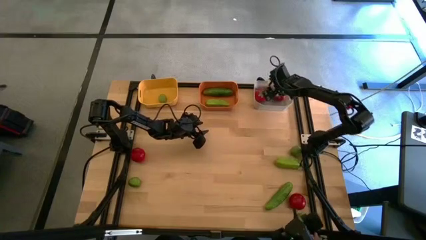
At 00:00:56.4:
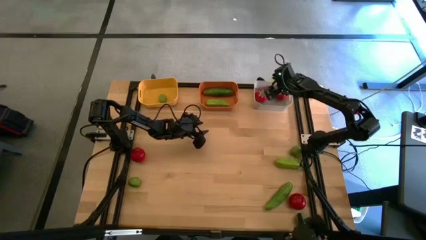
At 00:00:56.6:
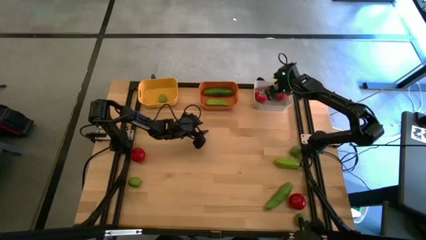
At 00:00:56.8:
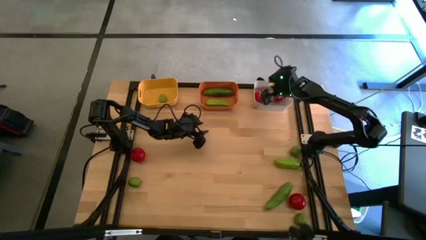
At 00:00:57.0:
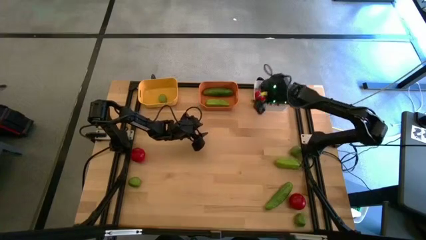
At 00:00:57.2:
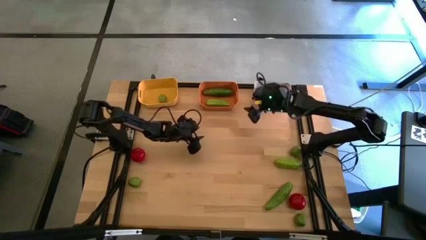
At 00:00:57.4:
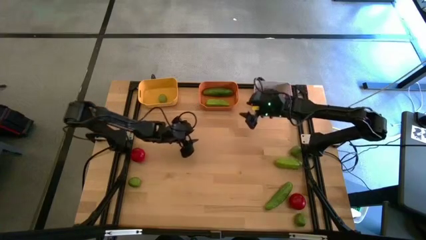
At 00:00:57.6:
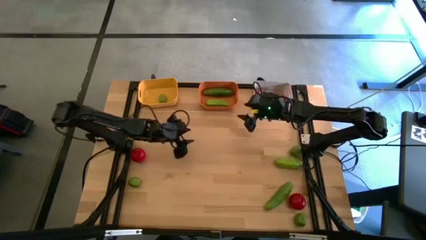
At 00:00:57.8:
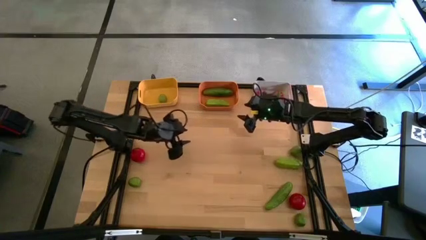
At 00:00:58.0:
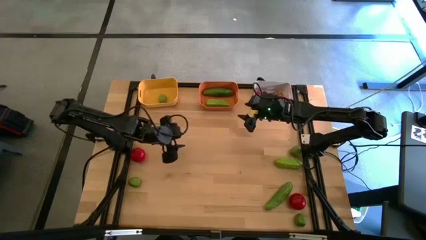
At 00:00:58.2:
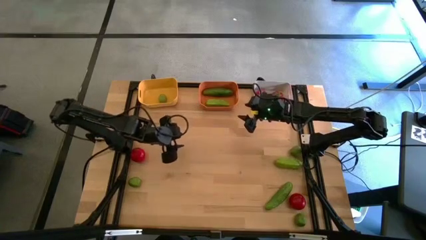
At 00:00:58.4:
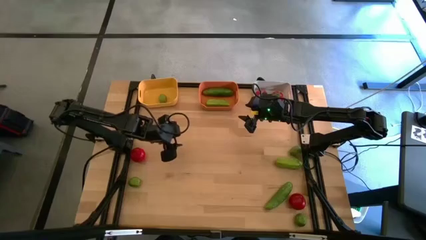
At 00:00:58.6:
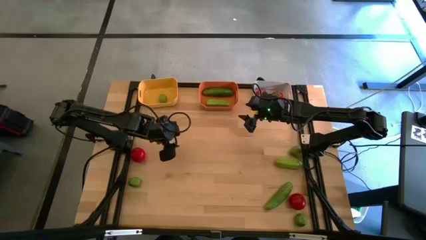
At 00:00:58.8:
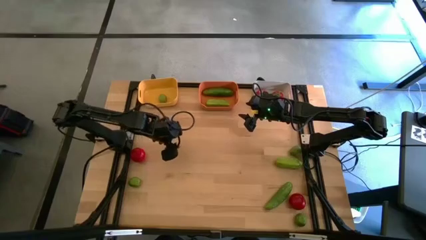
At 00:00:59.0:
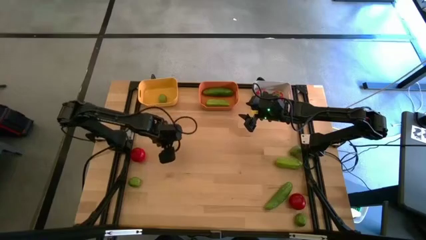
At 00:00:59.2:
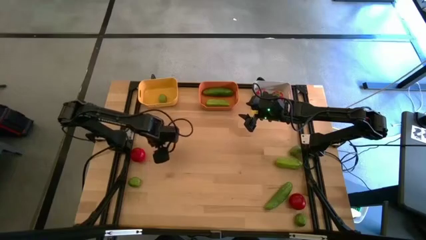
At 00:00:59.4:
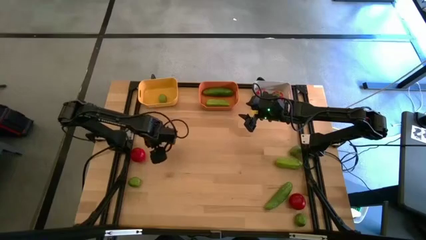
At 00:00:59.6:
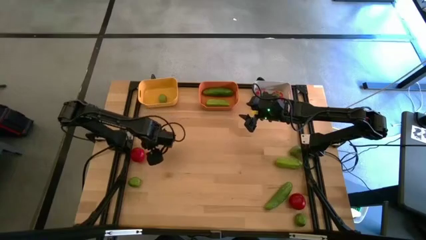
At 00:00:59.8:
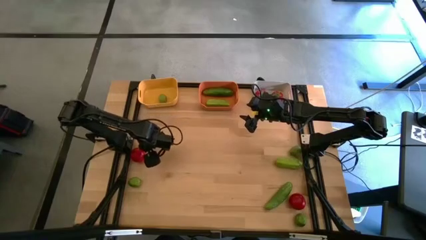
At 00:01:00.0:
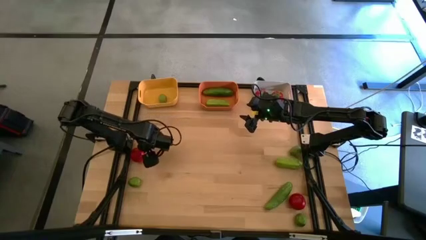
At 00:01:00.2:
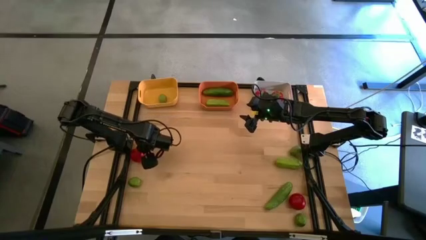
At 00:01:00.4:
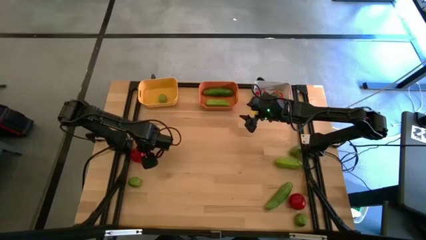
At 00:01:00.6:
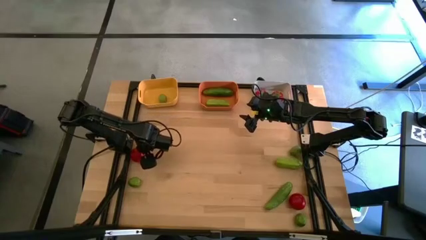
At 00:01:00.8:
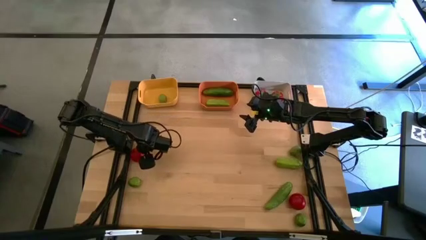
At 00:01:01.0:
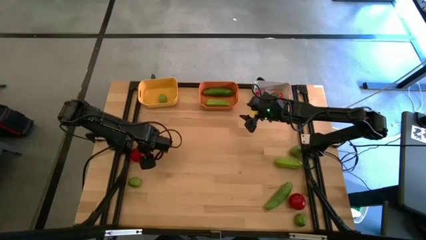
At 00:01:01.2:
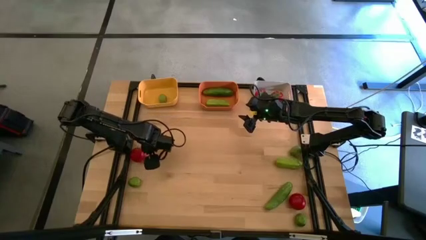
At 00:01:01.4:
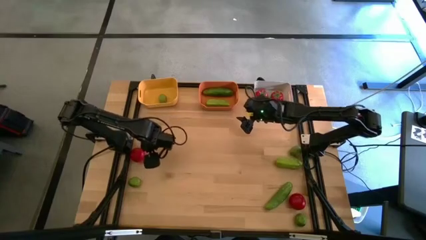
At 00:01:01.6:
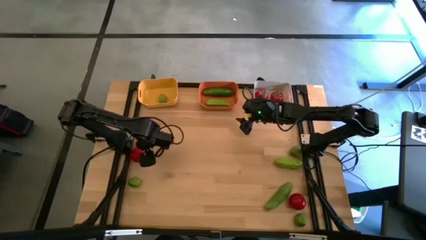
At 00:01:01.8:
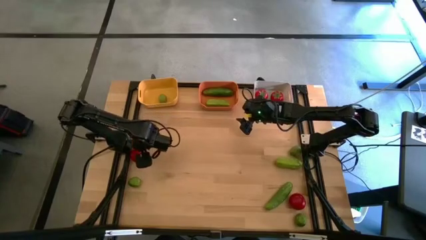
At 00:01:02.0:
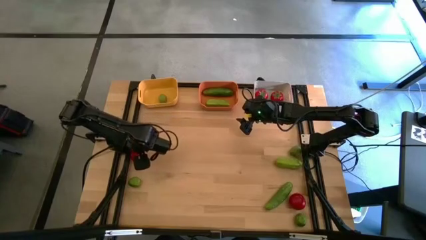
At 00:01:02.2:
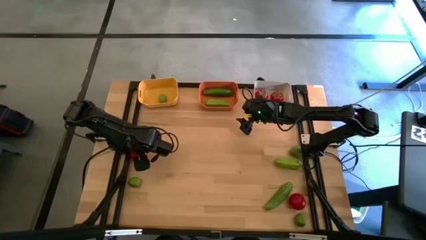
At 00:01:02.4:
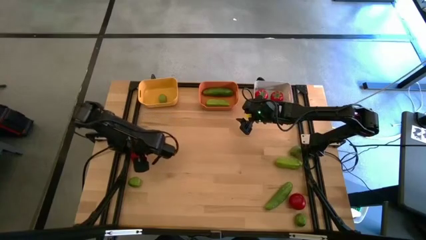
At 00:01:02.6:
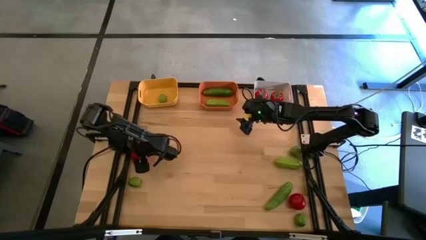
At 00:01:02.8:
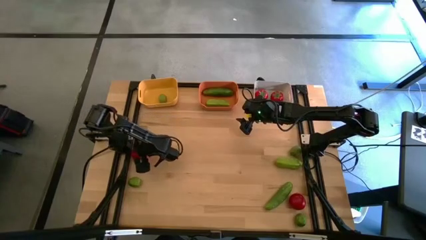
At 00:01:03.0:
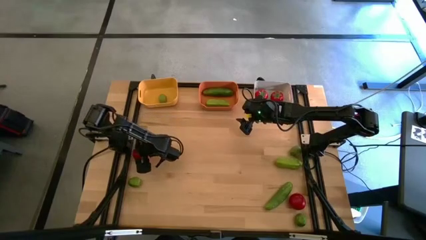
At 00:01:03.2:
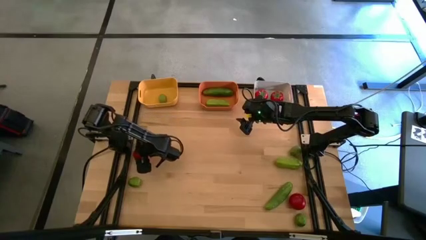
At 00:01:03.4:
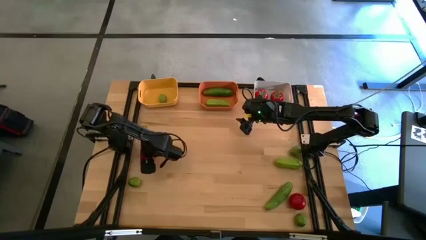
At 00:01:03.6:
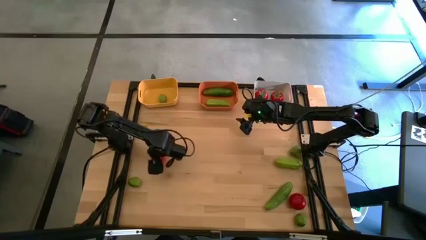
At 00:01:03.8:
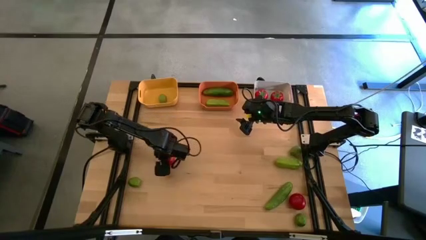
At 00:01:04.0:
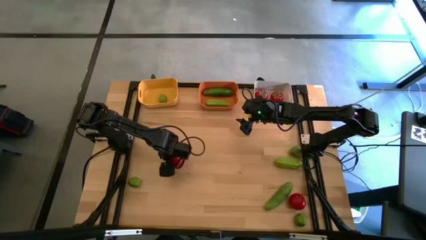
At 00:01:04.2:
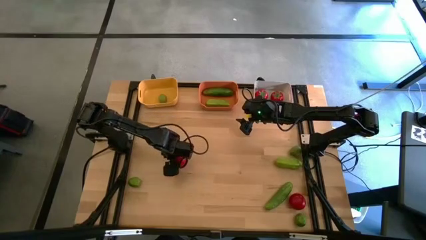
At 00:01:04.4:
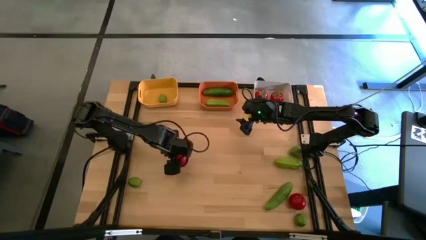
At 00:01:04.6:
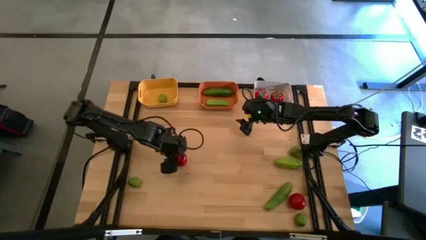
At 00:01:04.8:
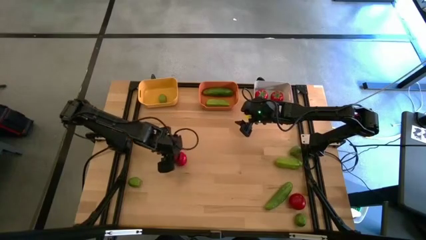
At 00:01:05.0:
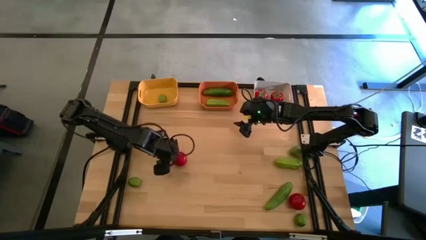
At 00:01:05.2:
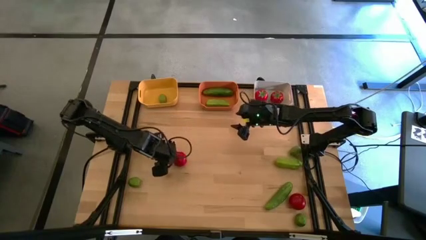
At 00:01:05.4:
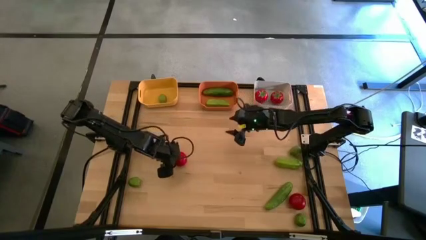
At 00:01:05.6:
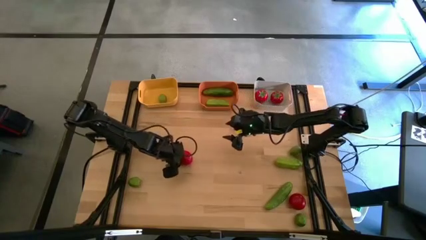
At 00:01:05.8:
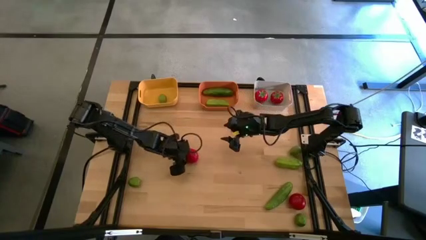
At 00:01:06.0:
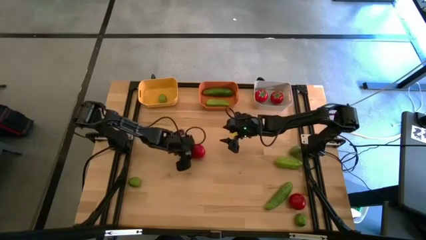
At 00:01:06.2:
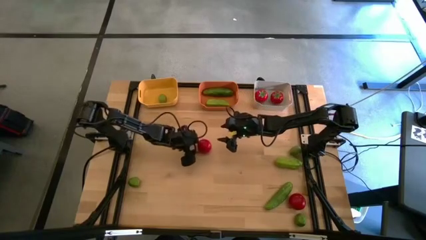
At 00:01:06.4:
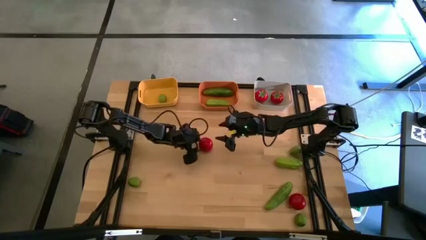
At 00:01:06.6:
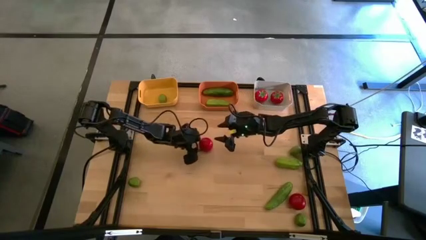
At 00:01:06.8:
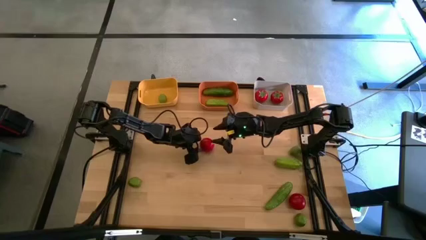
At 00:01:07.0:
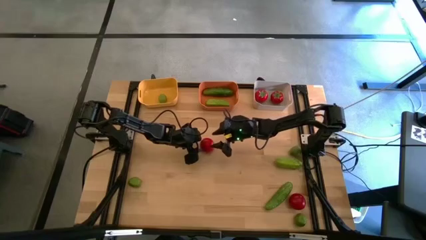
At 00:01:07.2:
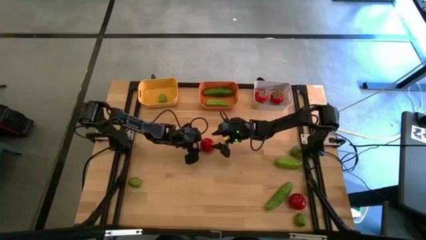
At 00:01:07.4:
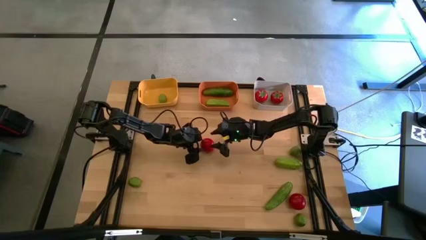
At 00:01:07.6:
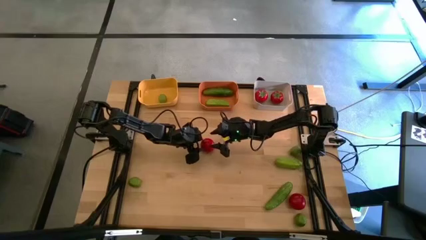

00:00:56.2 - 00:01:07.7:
Task: Sort produce into baskets
Put the tomato into the white bin
